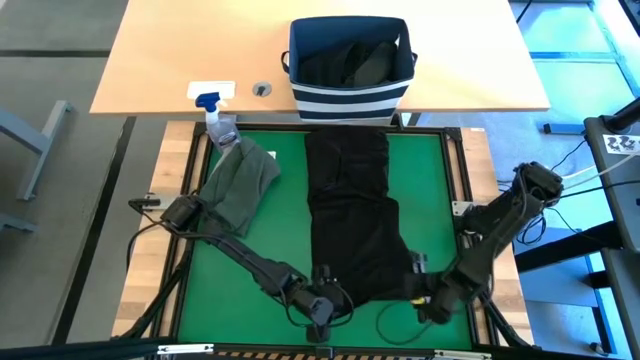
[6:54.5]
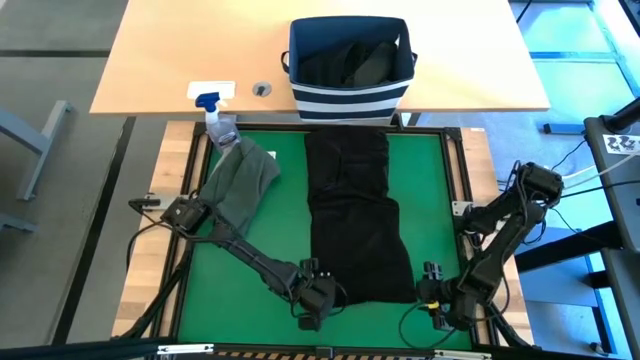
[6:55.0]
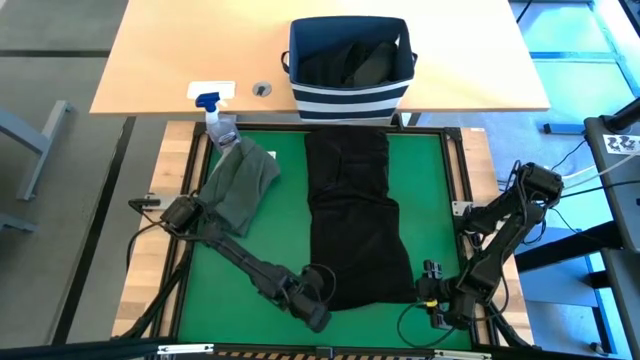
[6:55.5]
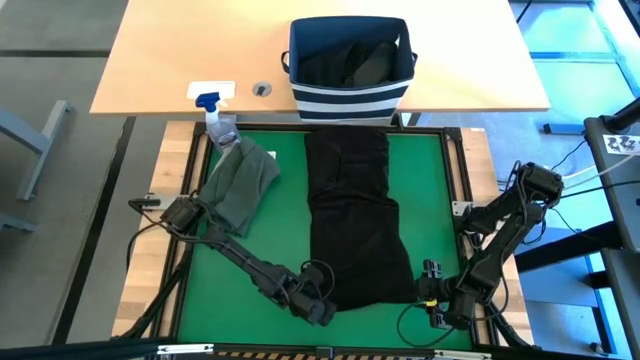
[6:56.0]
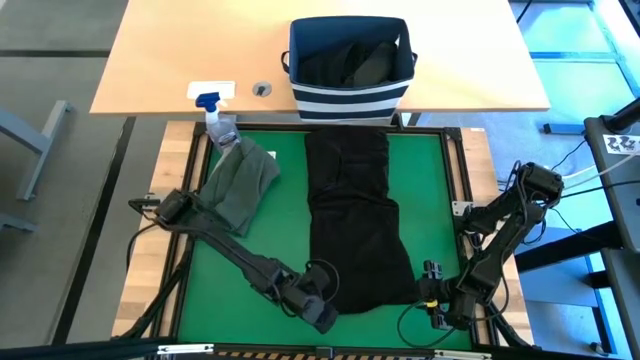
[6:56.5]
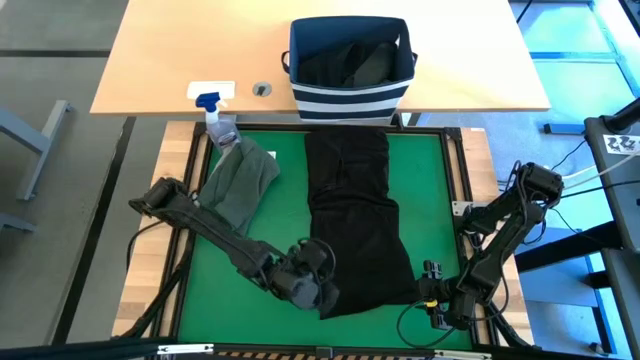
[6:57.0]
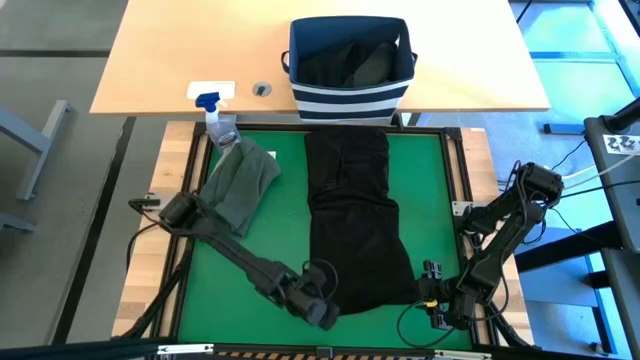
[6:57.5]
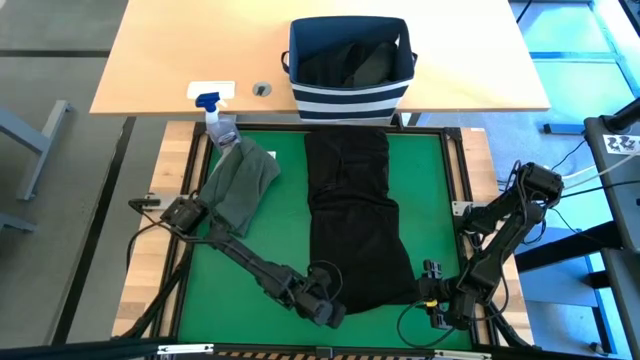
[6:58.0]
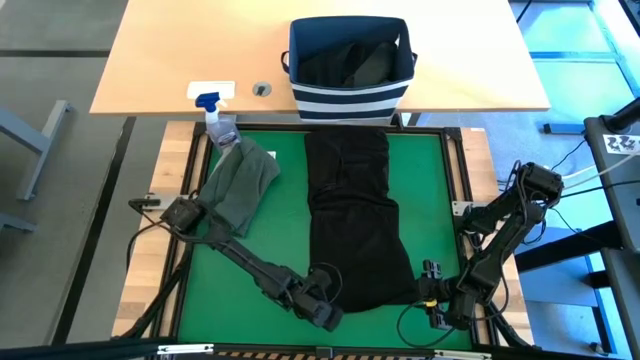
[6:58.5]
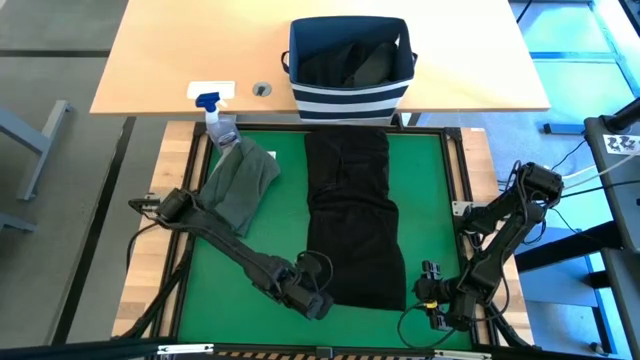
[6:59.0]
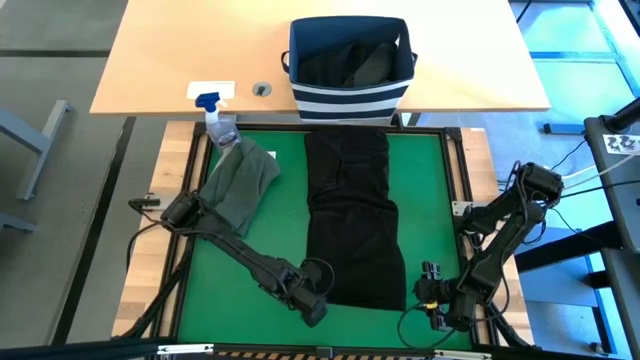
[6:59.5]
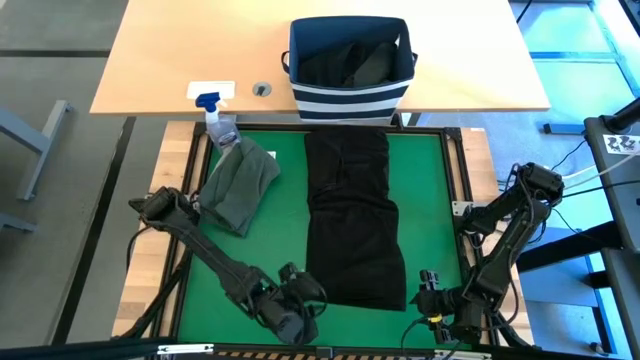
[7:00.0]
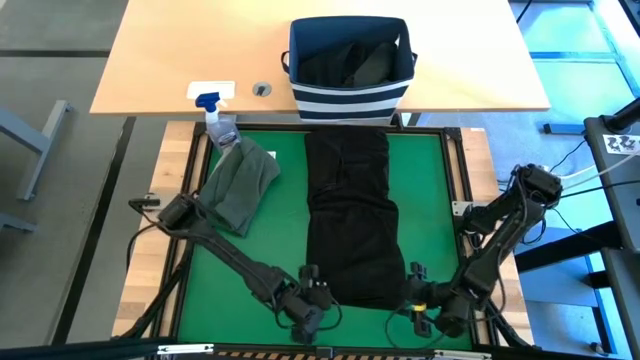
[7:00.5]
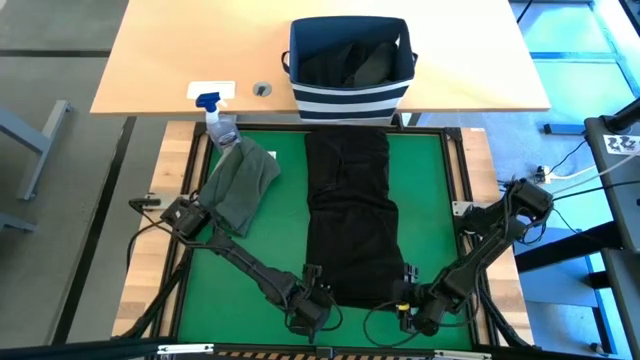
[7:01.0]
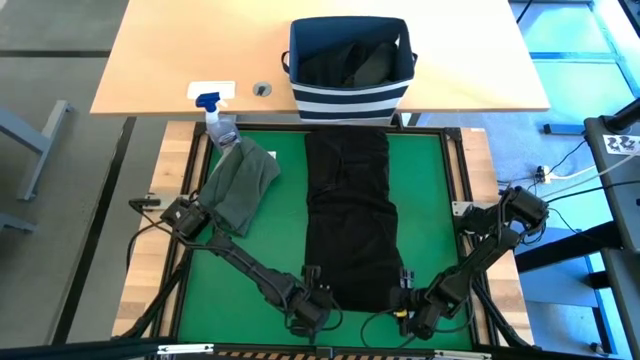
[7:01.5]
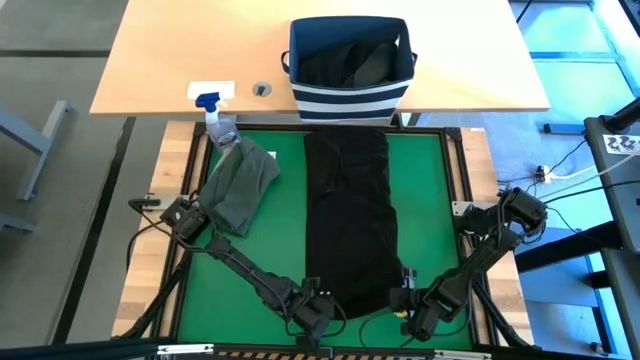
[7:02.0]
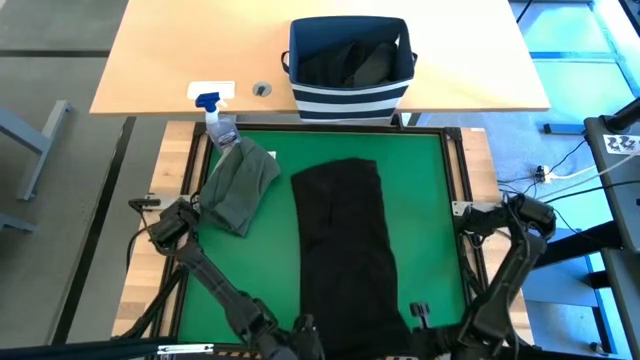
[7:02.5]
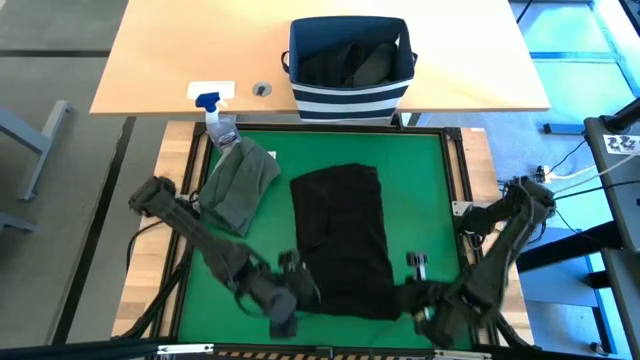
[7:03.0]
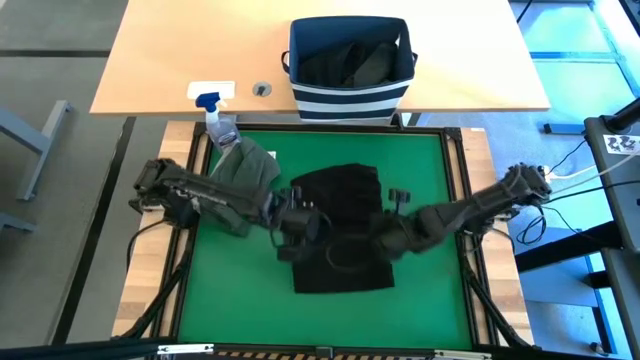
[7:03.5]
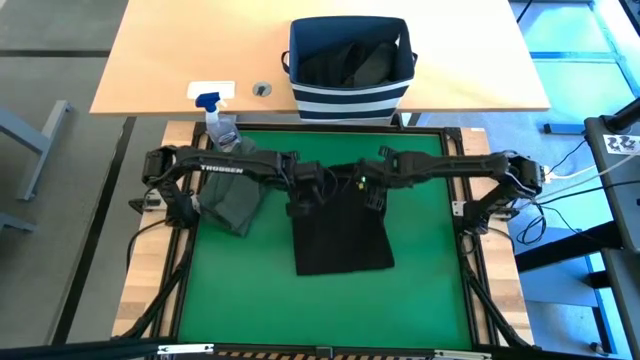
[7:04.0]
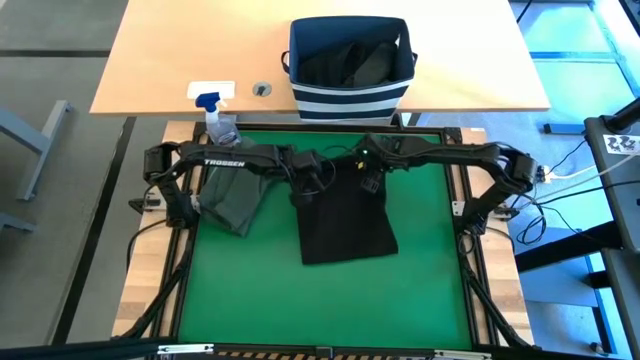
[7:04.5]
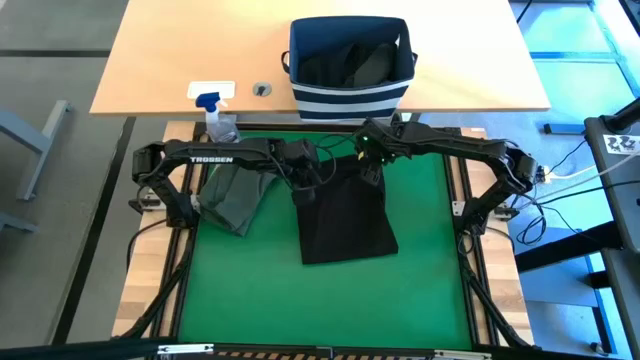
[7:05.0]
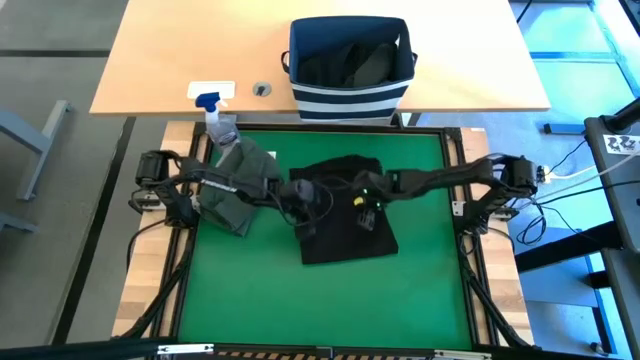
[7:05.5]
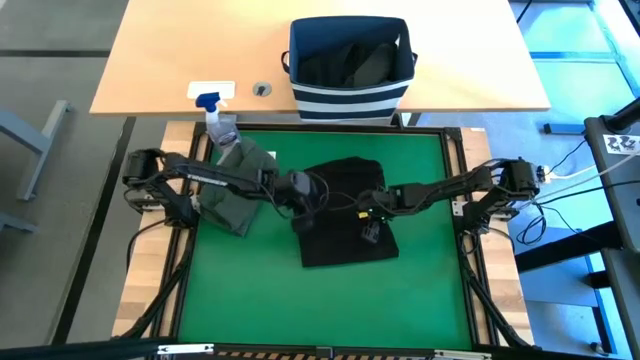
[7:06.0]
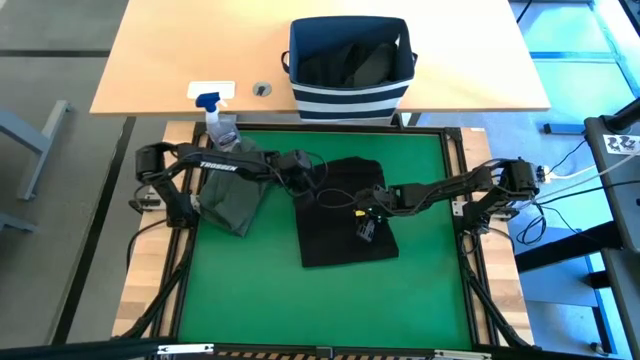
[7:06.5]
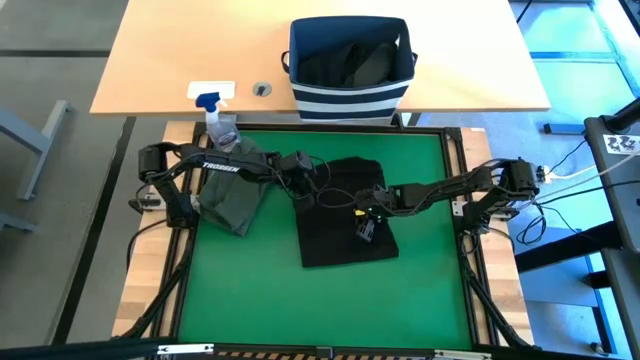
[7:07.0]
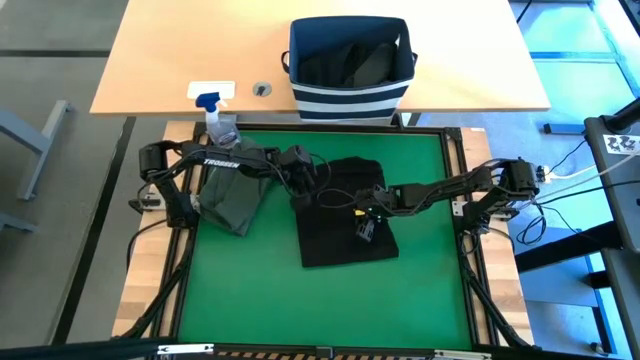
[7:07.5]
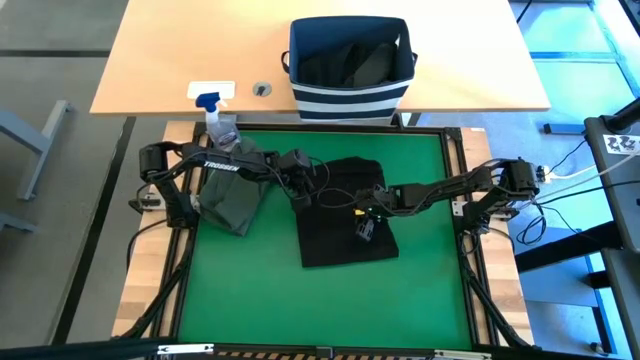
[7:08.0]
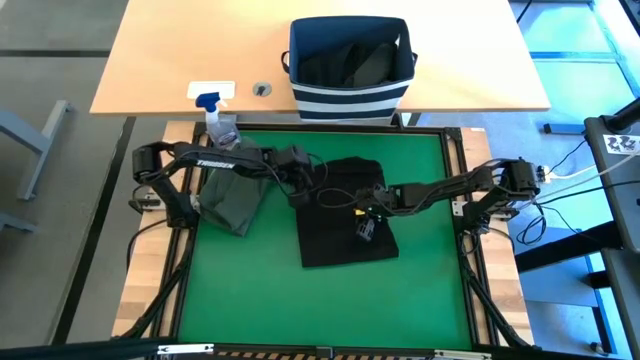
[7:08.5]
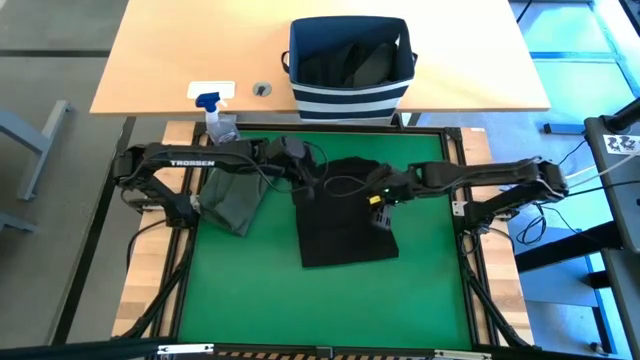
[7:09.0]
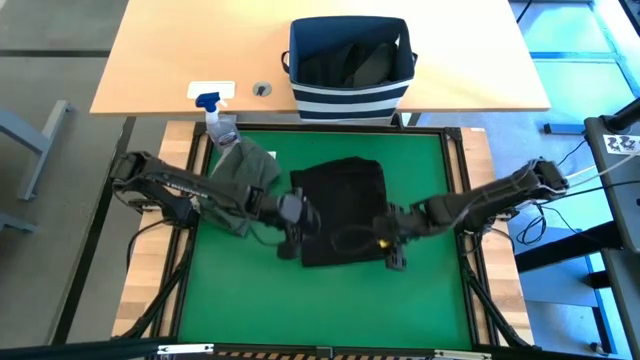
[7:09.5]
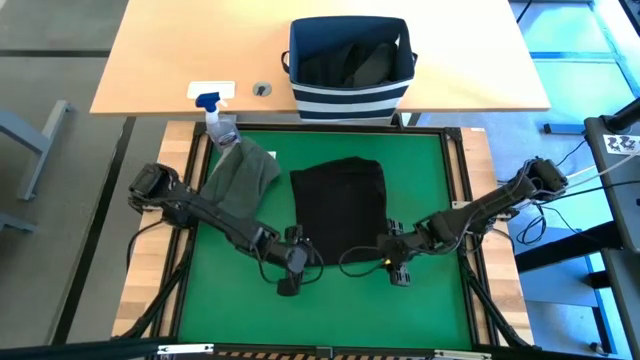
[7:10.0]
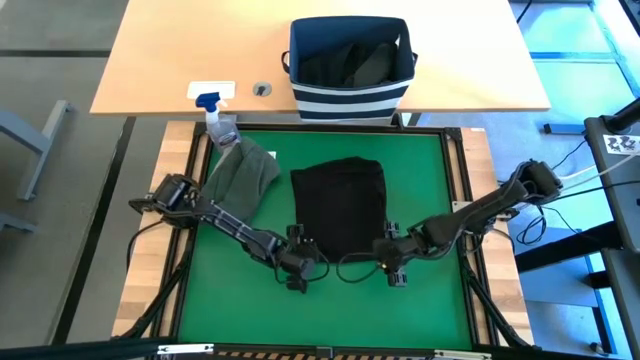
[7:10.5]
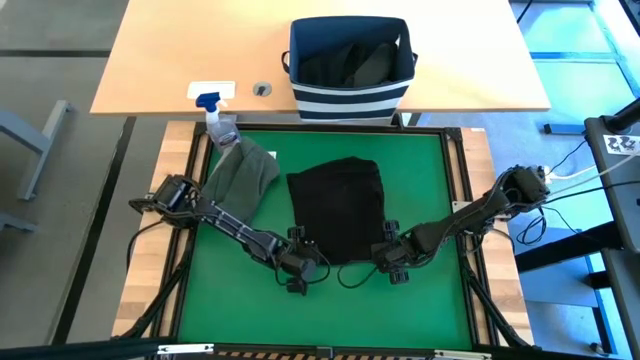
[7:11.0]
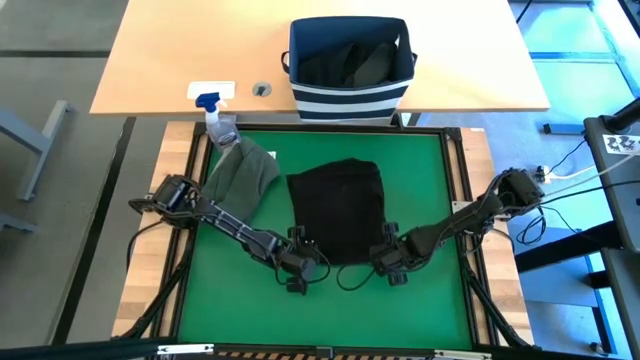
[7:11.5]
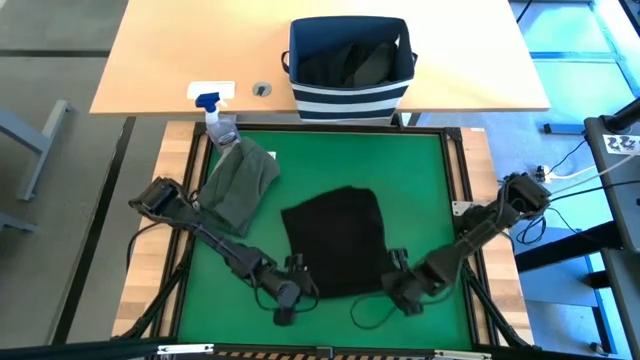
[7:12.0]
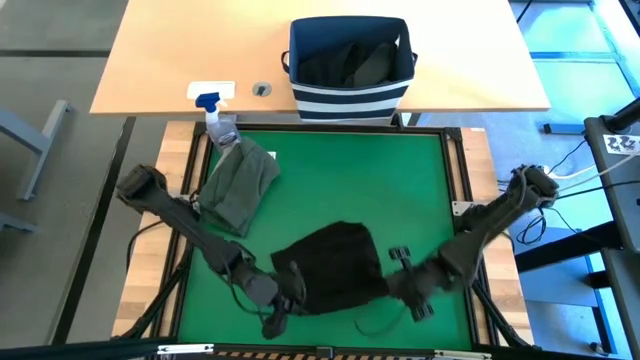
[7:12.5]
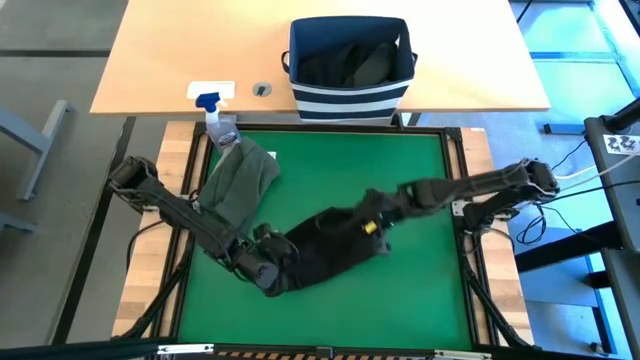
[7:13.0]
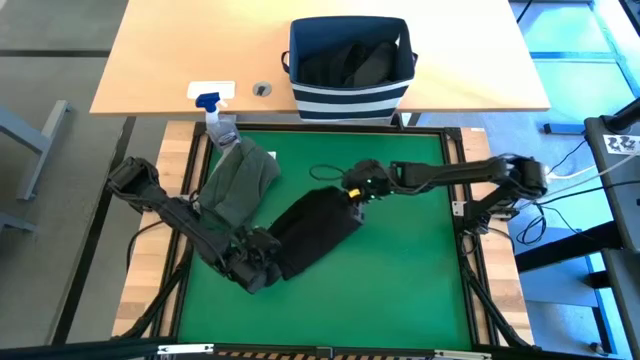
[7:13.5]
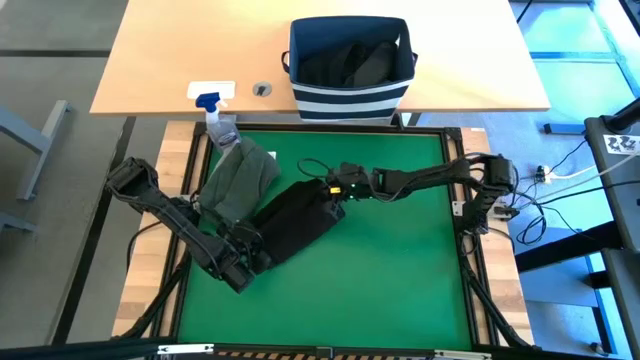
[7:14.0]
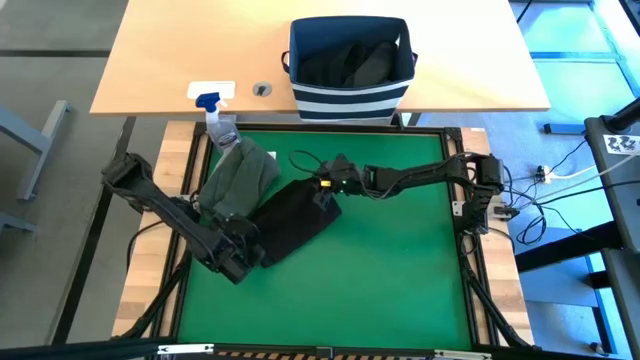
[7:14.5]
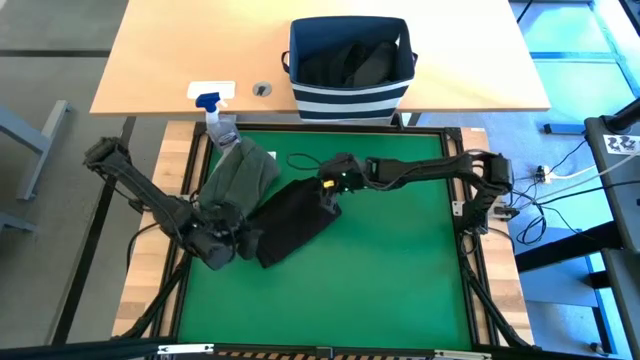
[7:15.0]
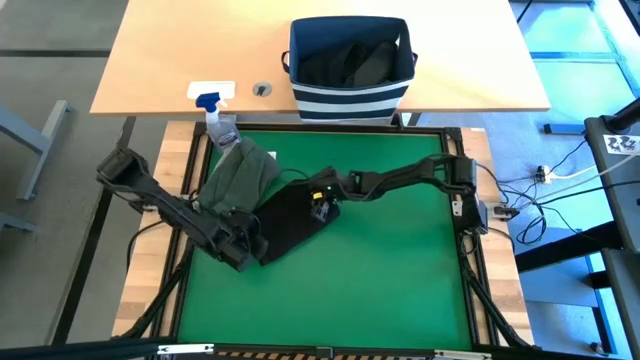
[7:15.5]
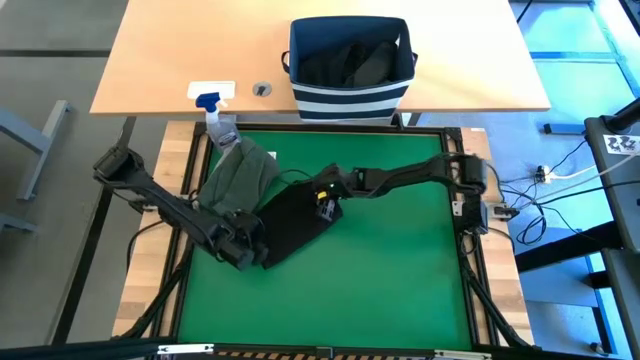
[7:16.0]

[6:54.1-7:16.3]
Task: Fold Laundry from Bin
Fold the black shirt
